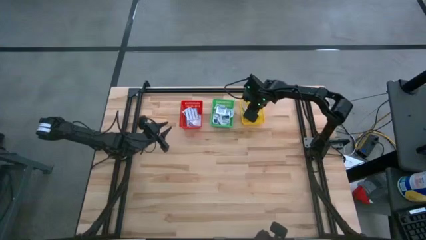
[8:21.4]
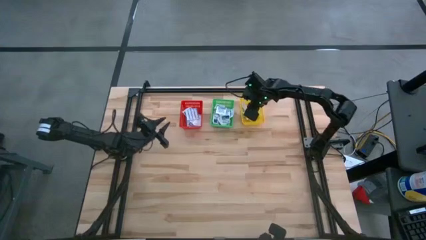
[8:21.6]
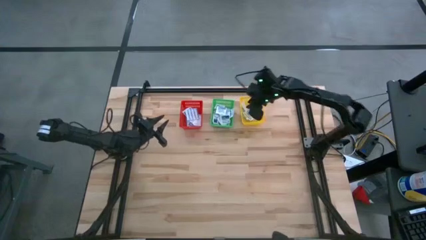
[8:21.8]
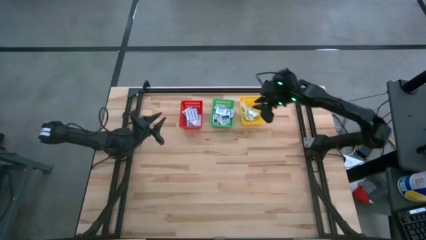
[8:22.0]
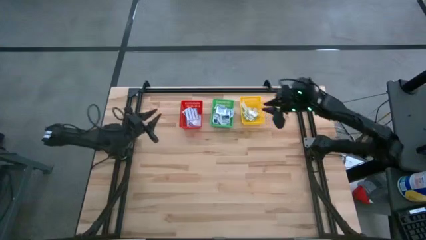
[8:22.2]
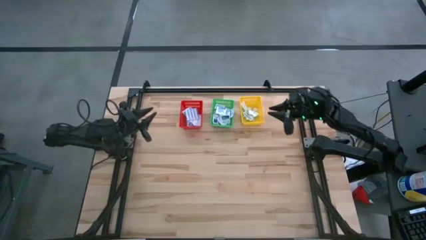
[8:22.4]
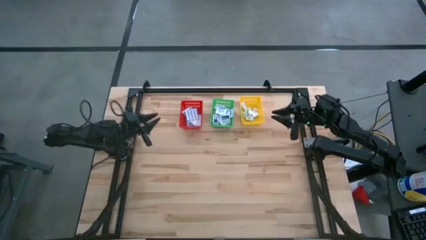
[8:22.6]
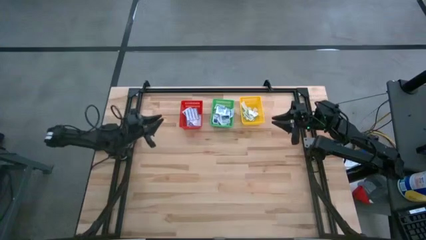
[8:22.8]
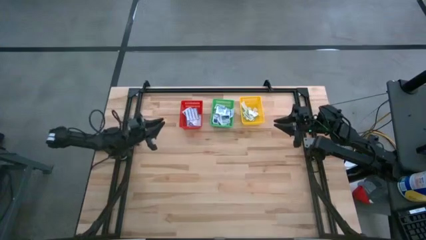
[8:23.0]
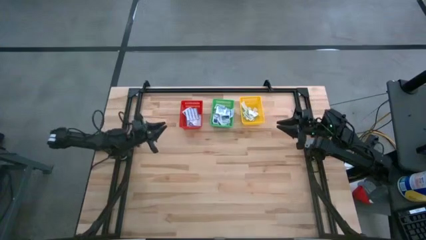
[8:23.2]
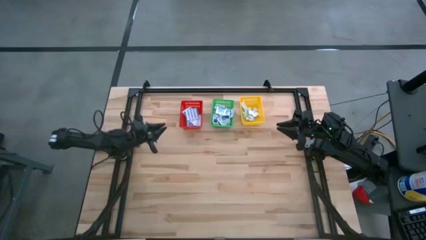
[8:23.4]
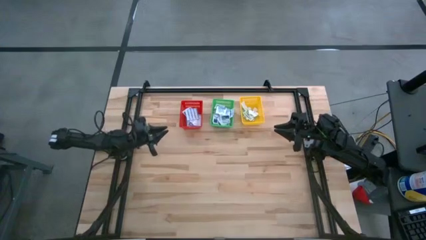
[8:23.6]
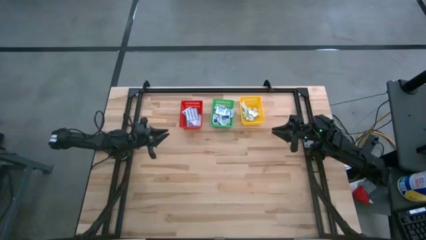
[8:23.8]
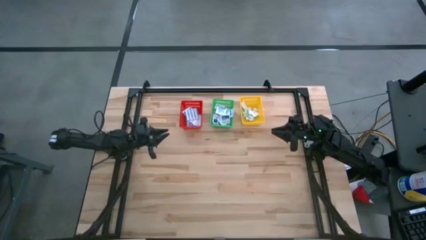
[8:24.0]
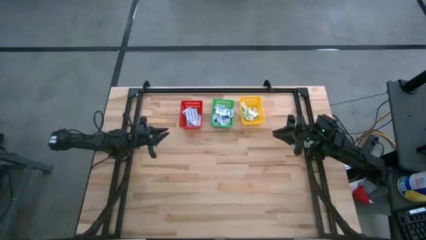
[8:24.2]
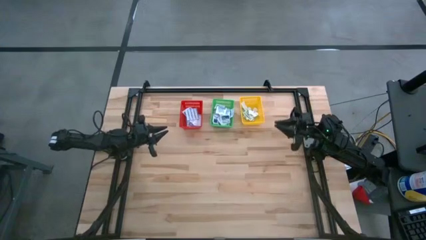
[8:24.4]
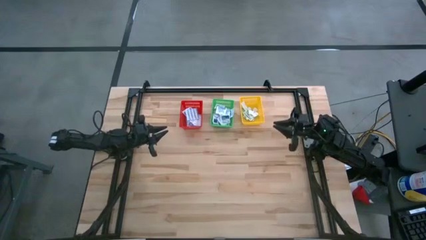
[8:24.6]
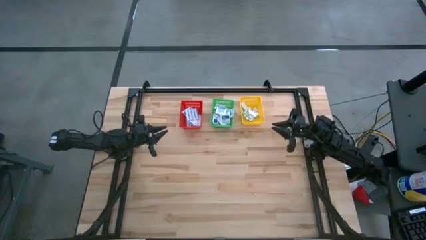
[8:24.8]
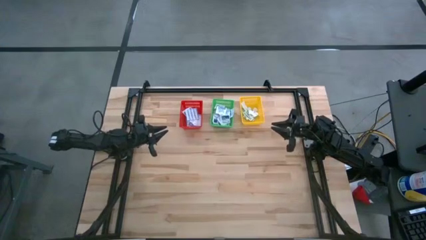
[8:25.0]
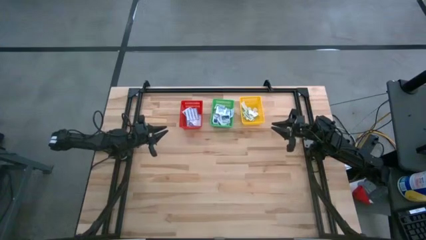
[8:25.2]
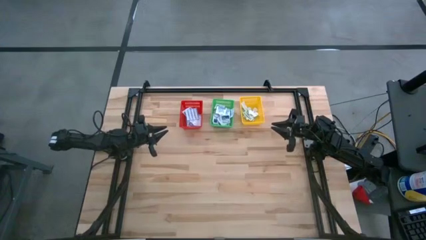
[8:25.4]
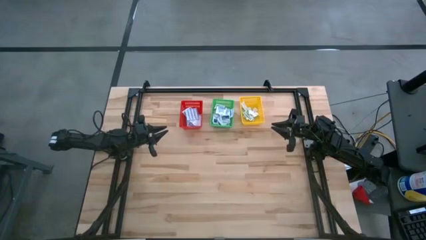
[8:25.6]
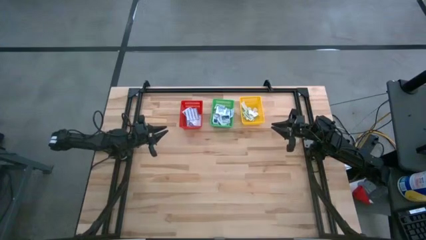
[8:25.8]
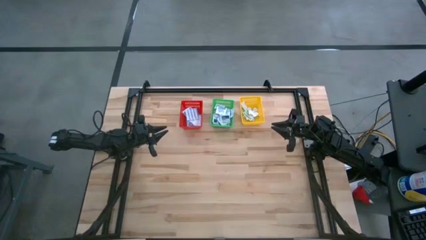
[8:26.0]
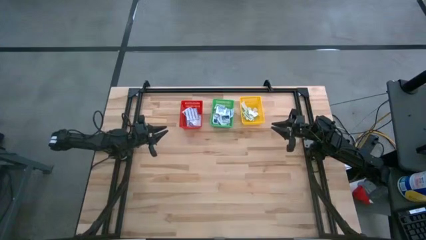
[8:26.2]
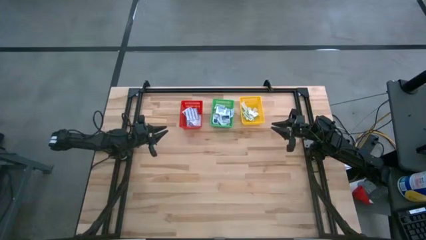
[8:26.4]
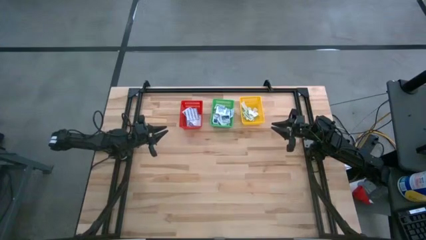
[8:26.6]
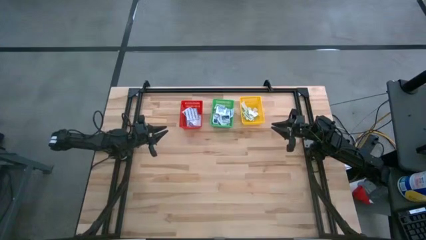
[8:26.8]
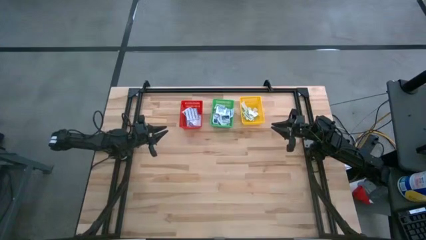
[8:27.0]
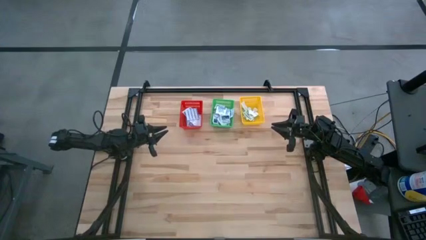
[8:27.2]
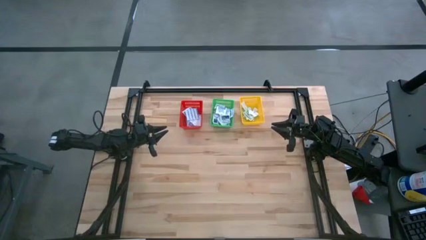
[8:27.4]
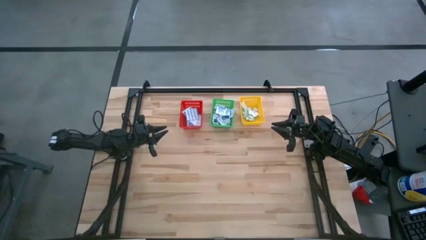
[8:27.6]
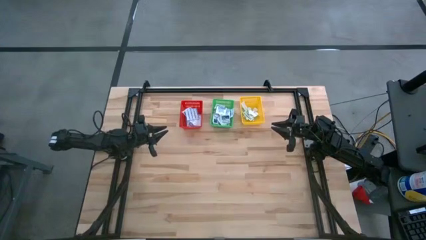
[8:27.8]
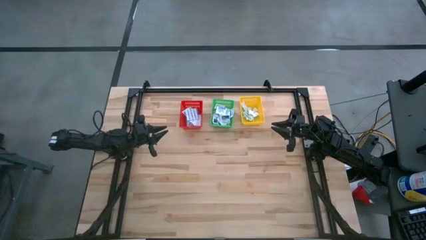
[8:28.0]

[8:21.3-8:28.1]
Task: Pick & Place First Aid Supplies
Return to Home Position

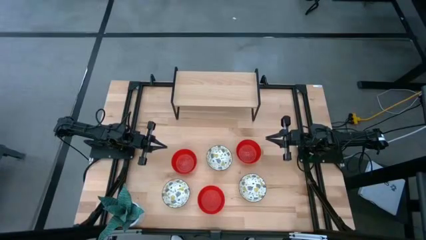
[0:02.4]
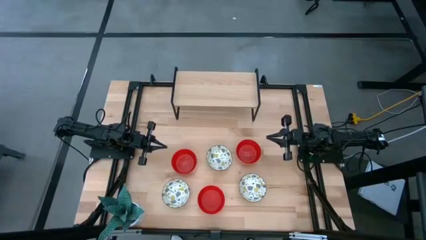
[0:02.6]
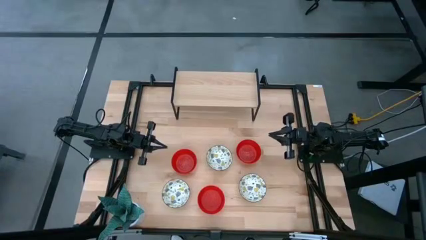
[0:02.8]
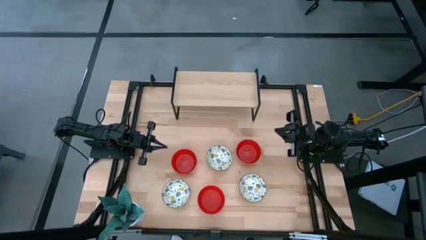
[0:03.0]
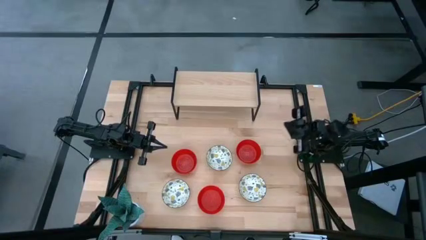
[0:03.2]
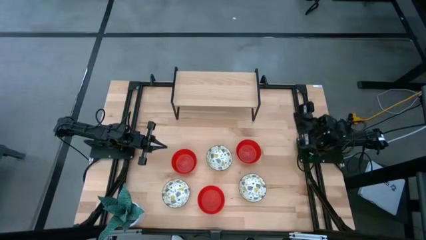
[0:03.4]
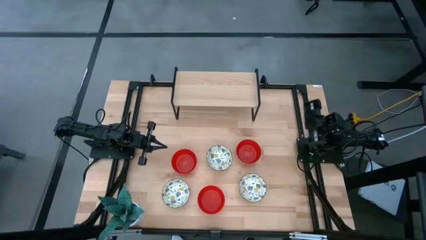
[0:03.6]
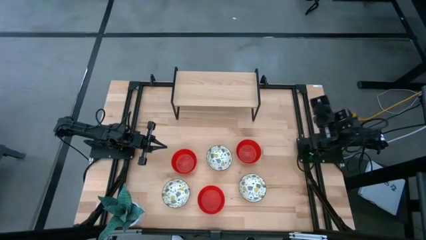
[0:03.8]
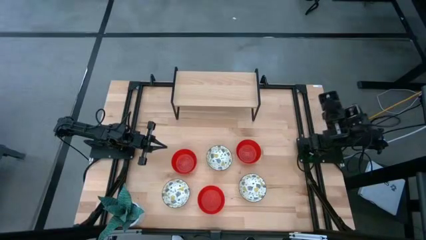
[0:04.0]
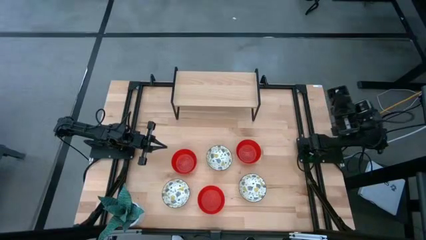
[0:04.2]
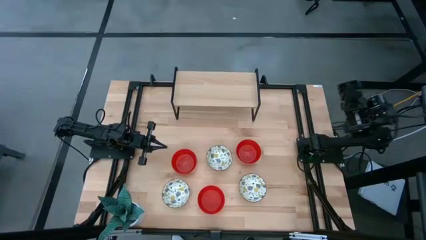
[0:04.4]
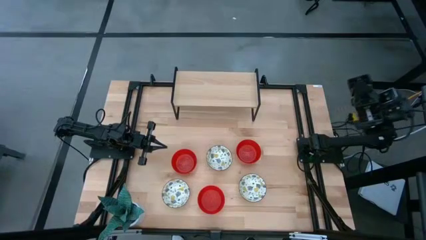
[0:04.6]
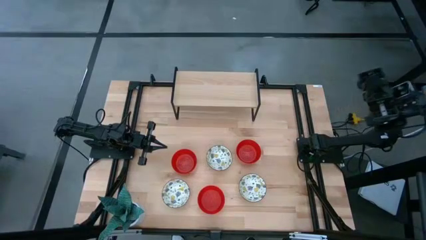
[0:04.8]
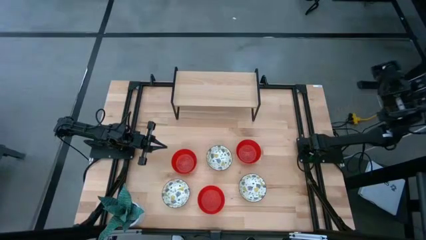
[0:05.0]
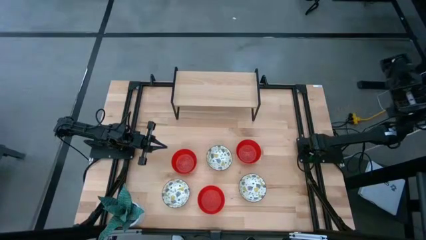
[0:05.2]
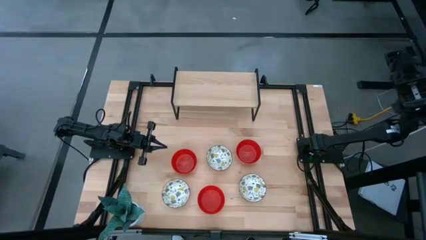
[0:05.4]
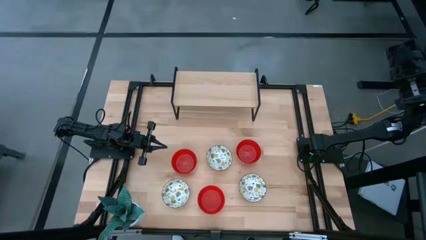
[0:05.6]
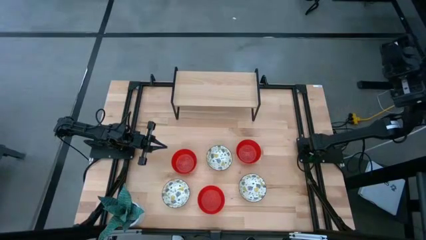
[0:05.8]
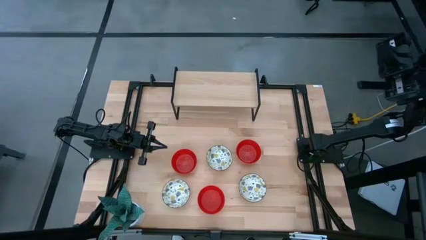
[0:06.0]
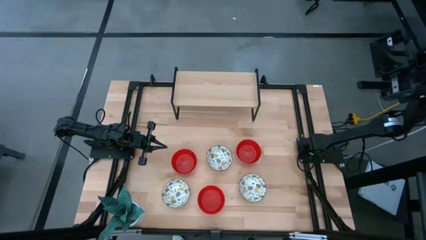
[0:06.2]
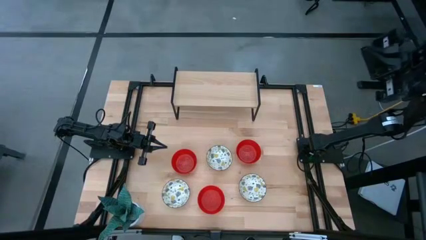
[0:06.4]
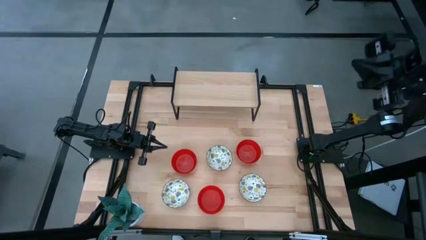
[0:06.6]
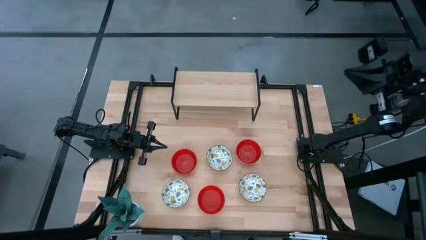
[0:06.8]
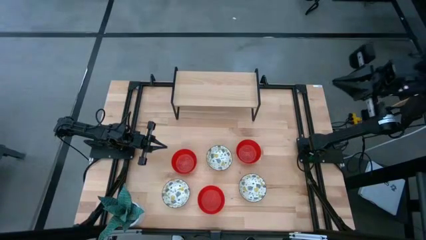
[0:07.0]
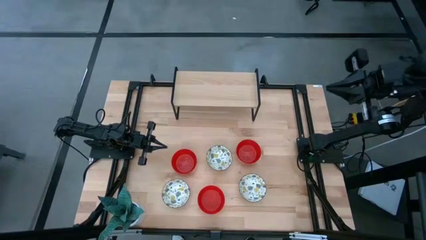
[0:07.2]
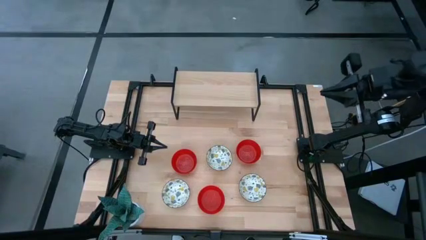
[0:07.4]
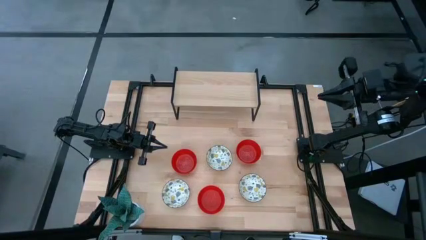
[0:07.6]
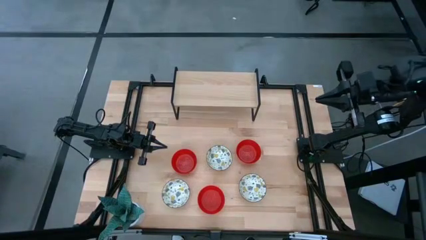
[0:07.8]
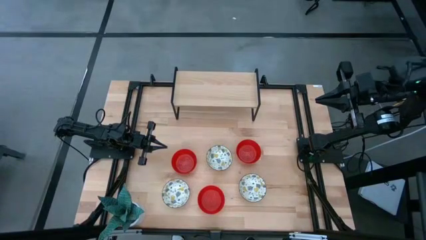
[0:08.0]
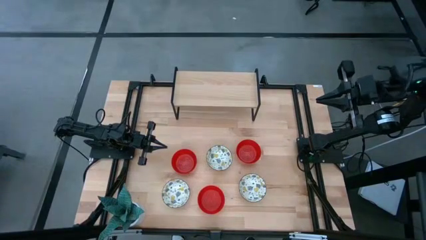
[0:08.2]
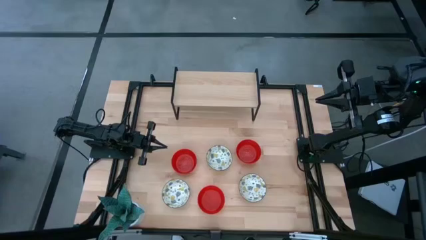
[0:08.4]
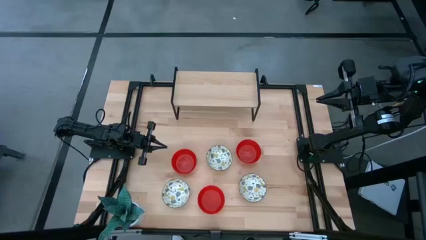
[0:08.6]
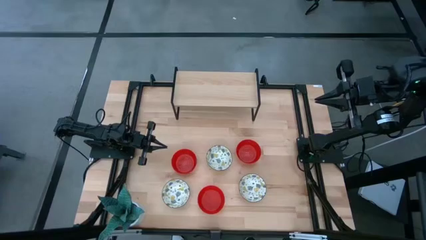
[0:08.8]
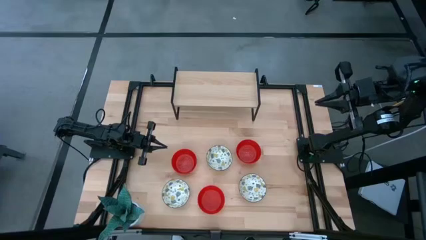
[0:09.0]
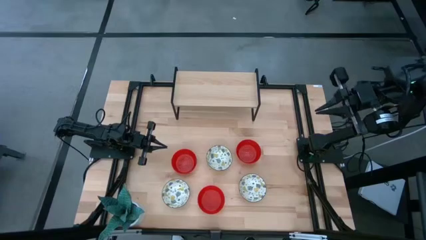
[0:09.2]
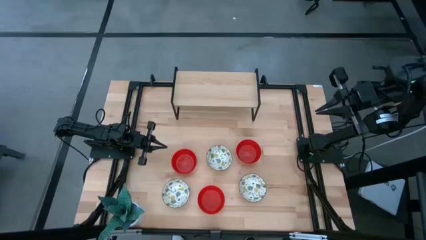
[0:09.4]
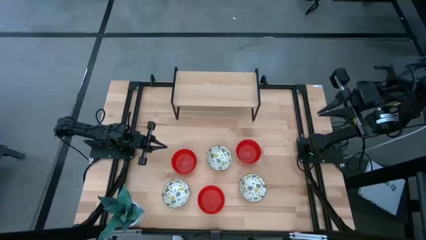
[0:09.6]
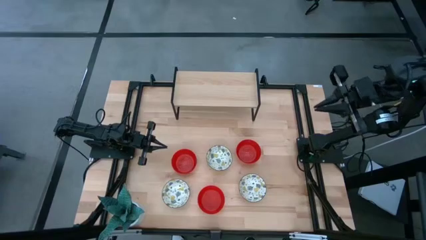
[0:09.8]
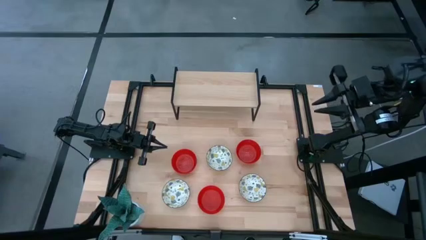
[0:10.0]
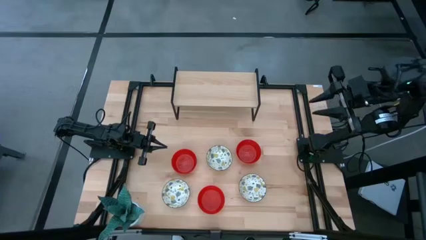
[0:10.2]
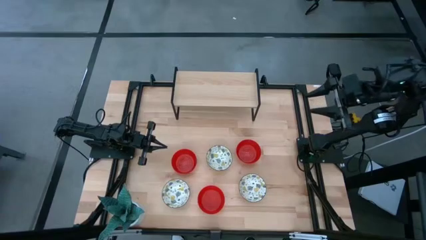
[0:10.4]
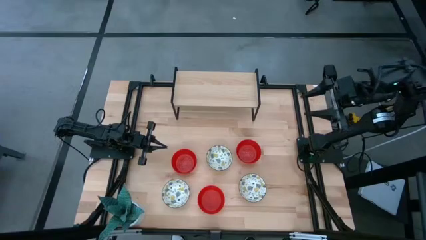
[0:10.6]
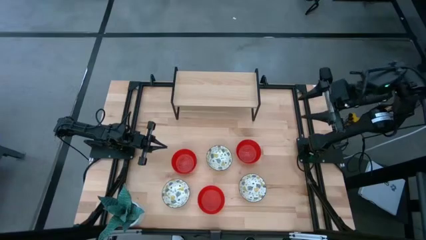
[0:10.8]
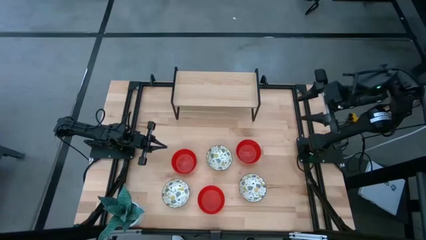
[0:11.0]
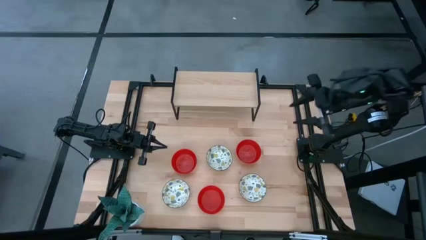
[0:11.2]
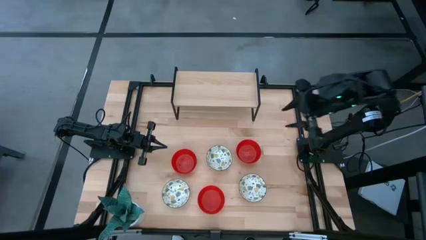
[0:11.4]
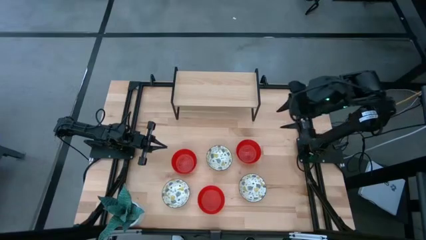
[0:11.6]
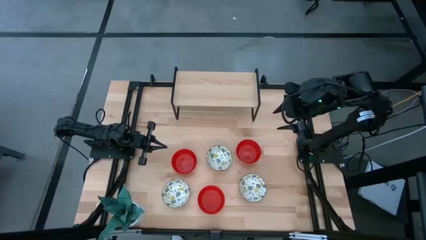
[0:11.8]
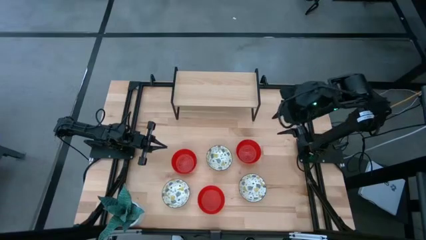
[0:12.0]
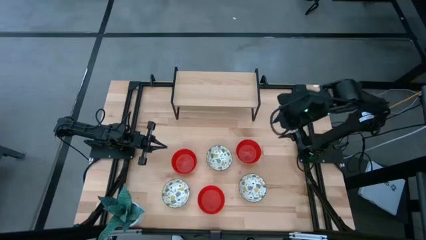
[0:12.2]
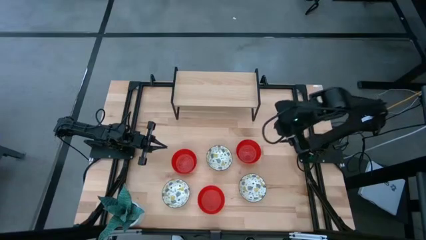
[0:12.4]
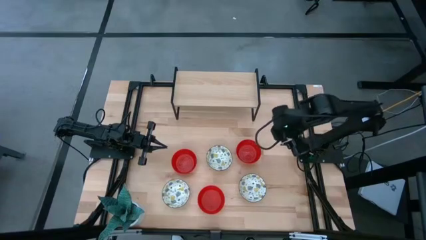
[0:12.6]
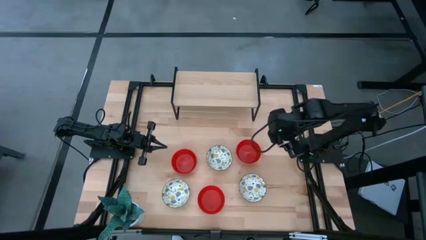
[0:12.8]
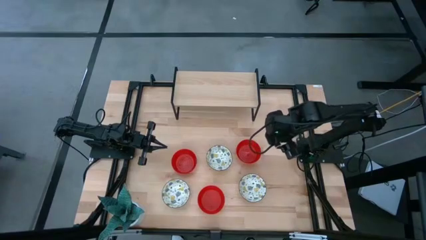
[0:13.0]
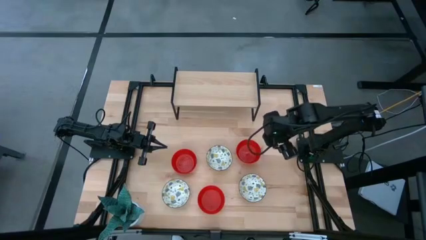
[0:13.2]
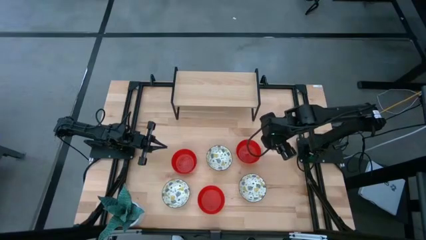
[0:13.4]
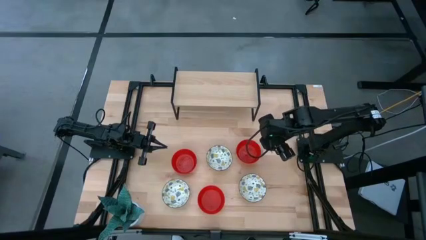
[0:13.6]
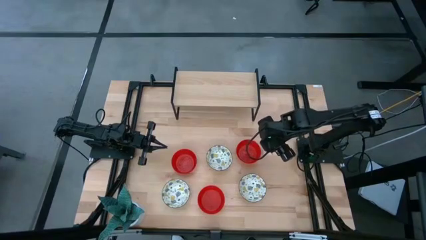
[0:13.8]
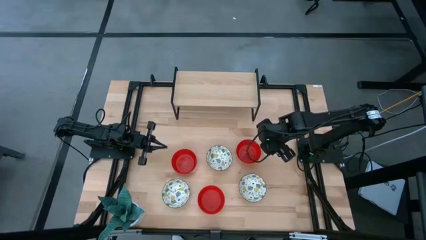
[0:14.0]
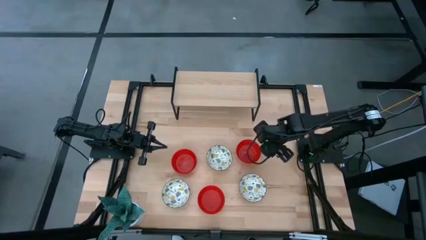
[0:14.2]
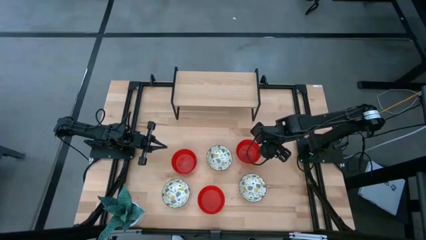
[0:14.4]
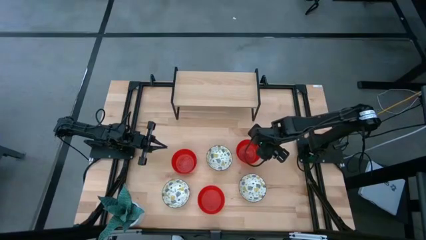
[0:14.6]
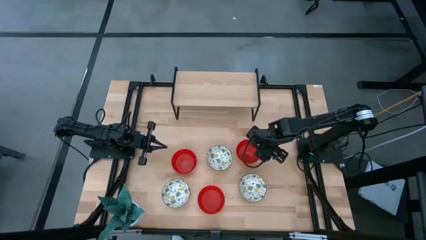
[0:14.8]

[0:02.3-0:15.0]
Task: Pick & Place Mini bowls
Put the right red bowl on the shelf
